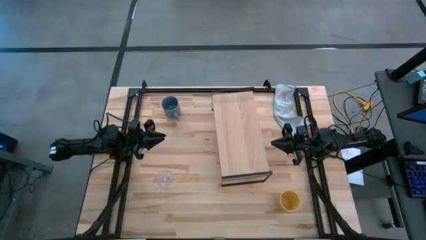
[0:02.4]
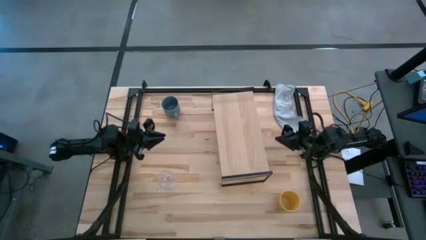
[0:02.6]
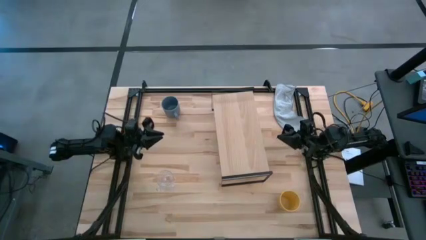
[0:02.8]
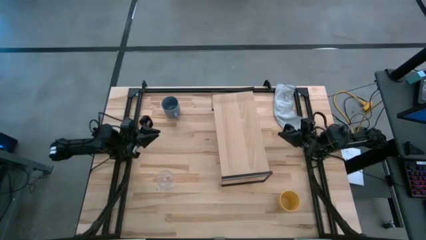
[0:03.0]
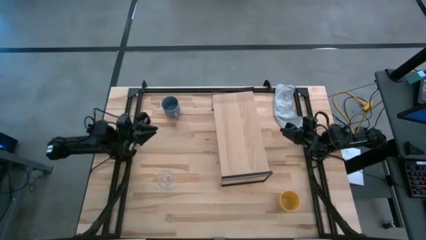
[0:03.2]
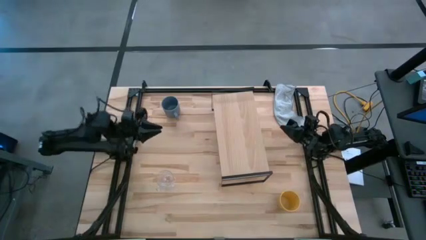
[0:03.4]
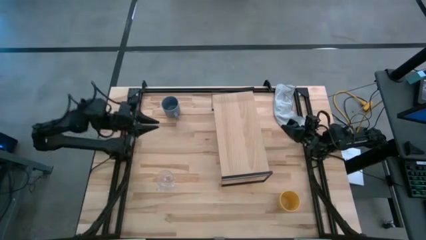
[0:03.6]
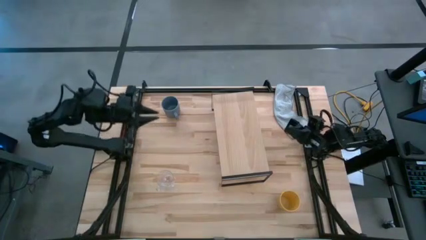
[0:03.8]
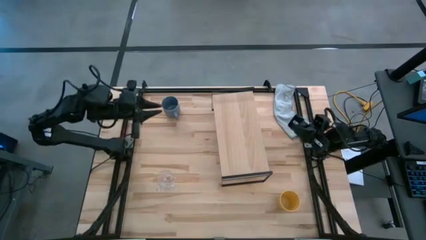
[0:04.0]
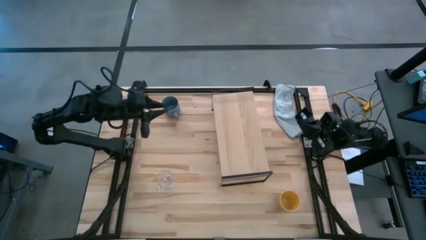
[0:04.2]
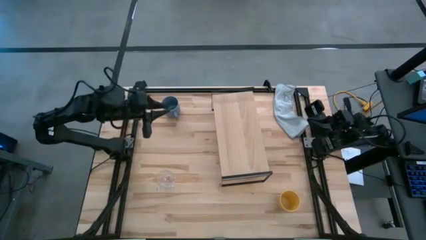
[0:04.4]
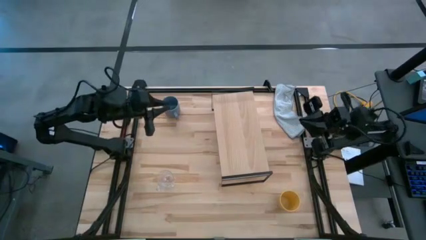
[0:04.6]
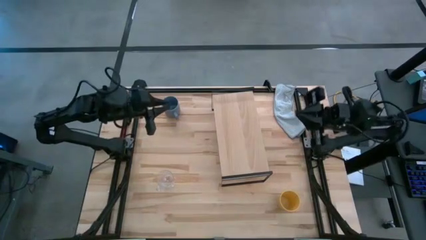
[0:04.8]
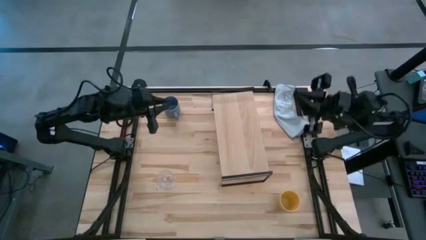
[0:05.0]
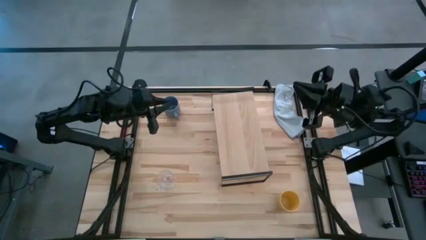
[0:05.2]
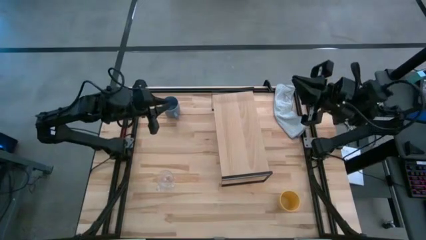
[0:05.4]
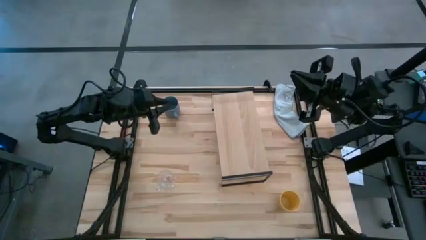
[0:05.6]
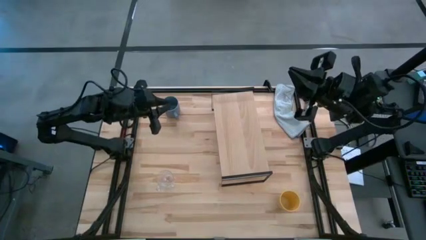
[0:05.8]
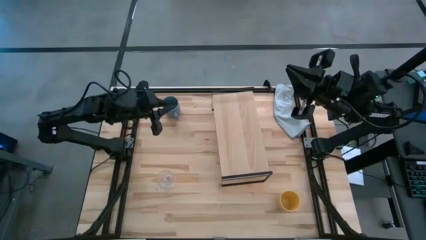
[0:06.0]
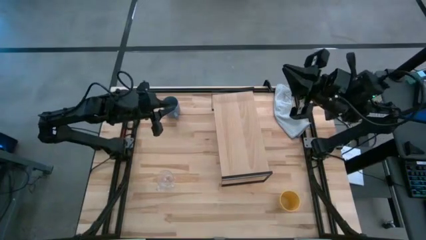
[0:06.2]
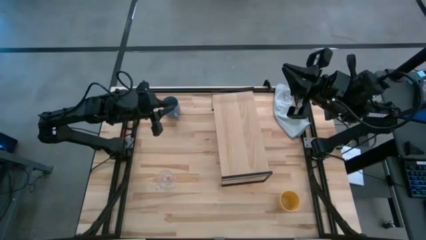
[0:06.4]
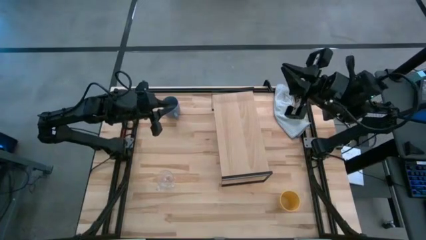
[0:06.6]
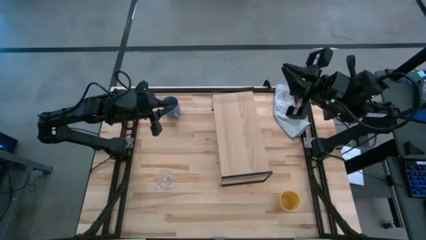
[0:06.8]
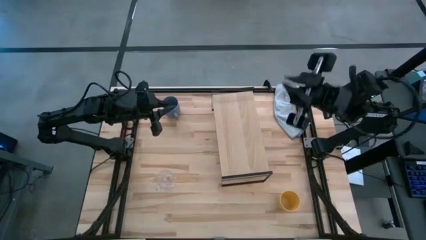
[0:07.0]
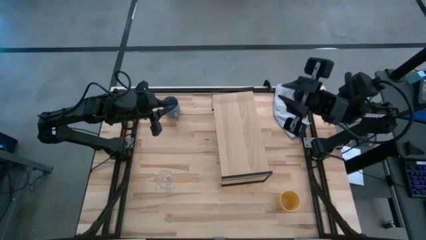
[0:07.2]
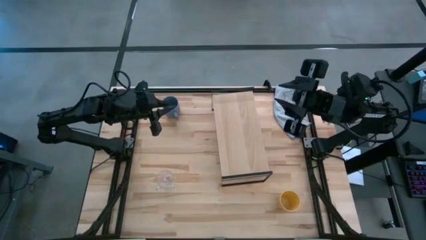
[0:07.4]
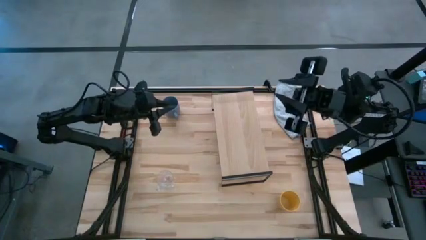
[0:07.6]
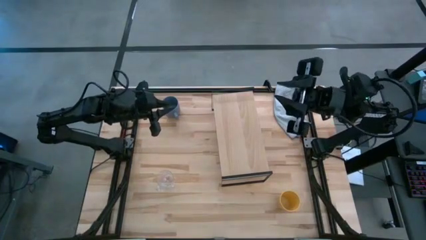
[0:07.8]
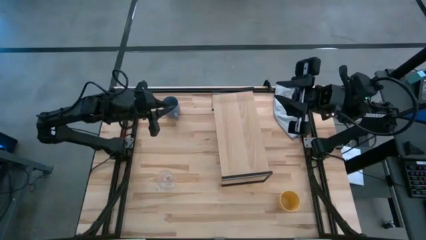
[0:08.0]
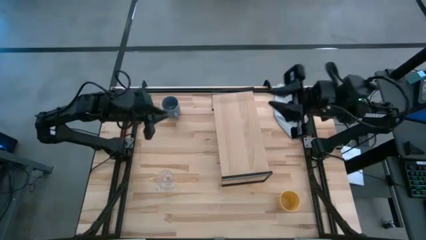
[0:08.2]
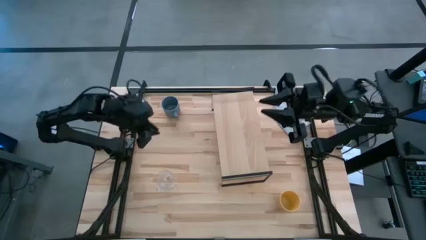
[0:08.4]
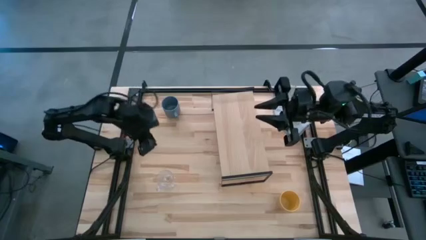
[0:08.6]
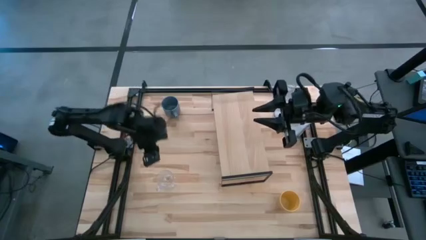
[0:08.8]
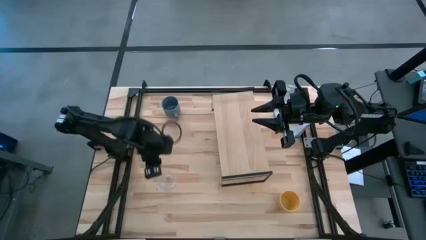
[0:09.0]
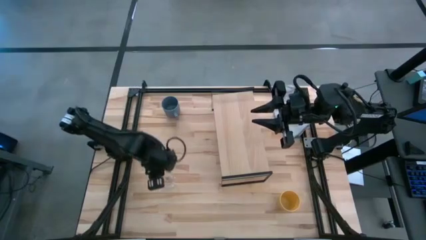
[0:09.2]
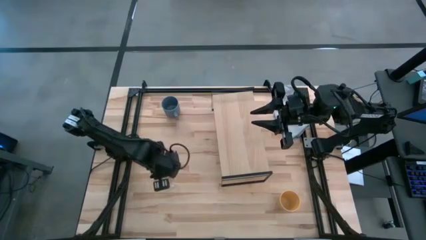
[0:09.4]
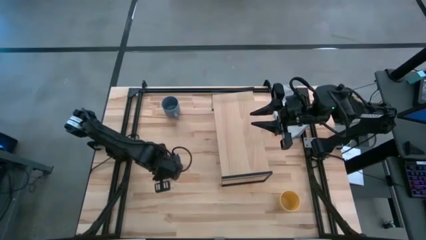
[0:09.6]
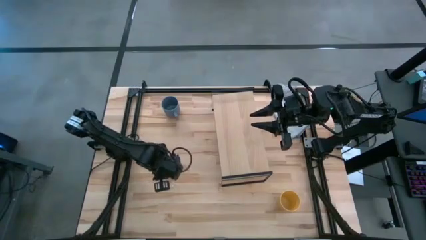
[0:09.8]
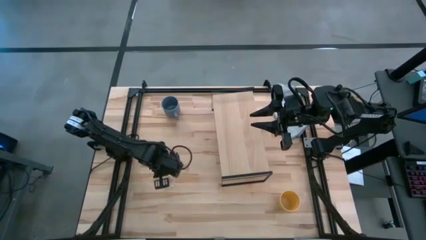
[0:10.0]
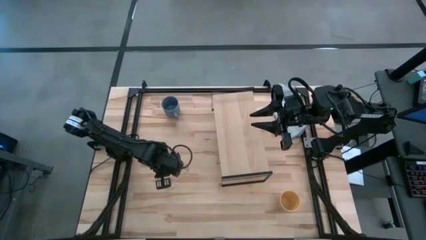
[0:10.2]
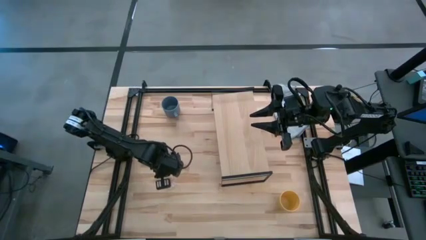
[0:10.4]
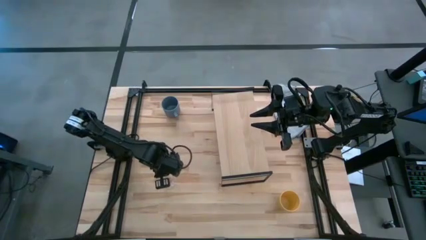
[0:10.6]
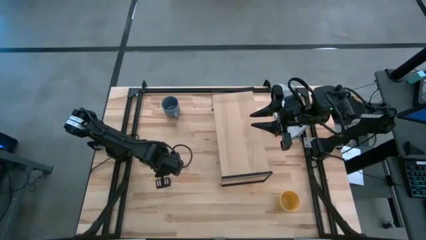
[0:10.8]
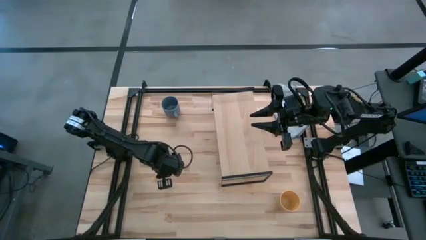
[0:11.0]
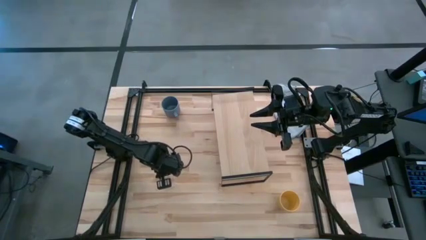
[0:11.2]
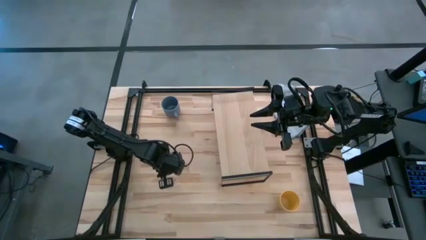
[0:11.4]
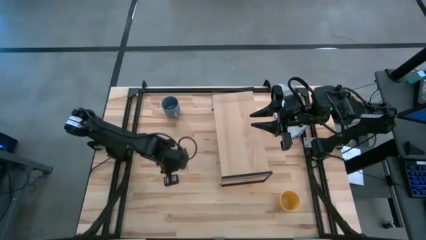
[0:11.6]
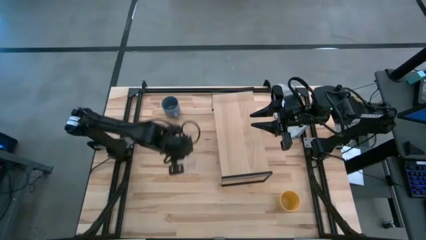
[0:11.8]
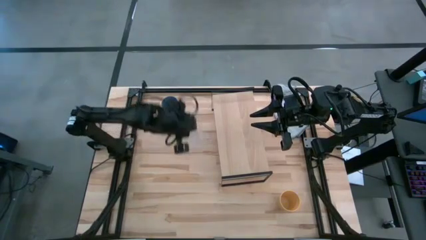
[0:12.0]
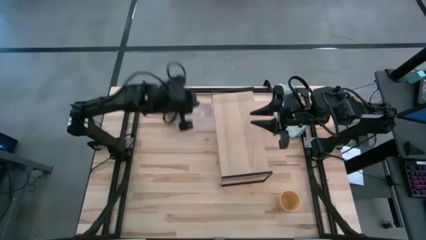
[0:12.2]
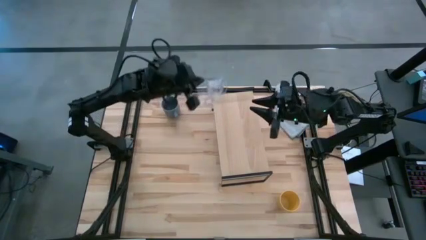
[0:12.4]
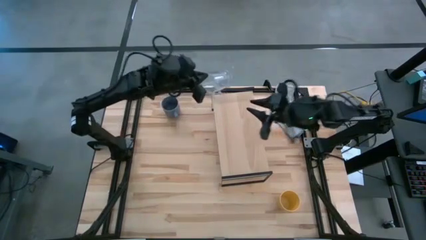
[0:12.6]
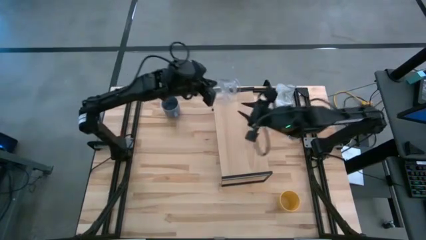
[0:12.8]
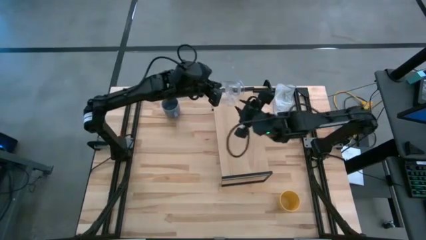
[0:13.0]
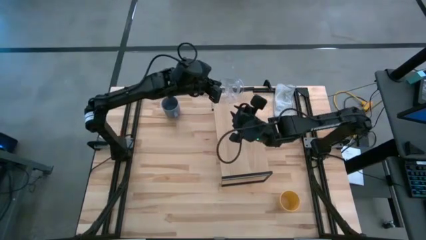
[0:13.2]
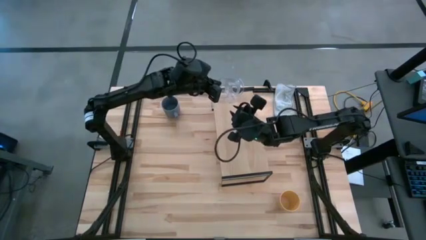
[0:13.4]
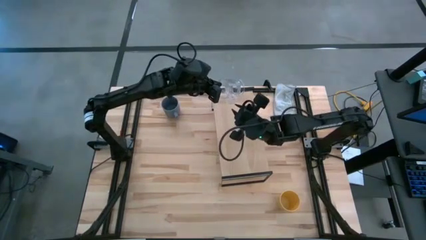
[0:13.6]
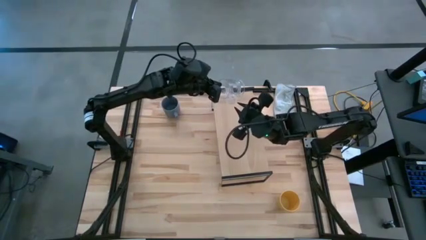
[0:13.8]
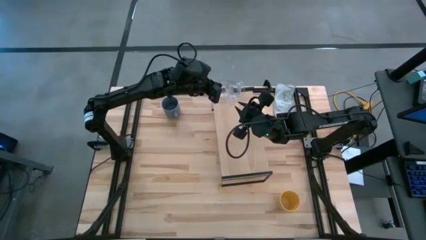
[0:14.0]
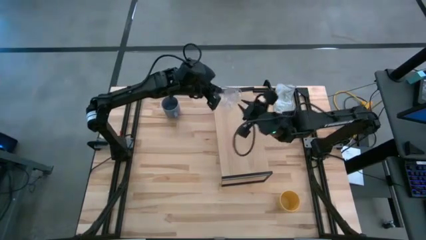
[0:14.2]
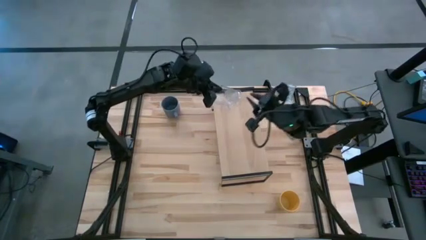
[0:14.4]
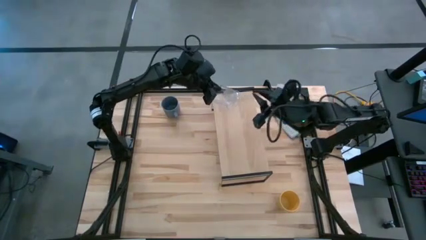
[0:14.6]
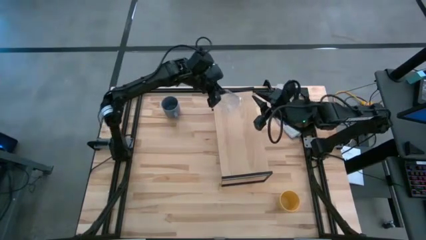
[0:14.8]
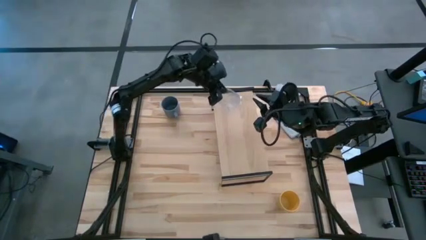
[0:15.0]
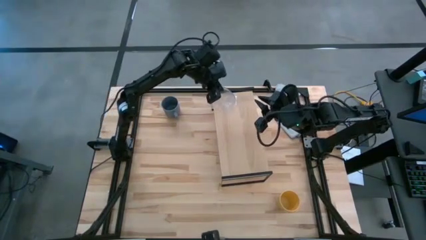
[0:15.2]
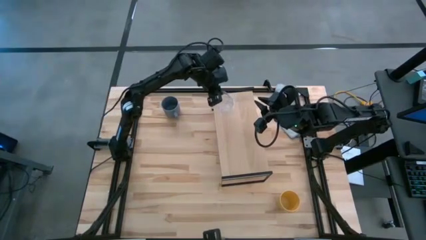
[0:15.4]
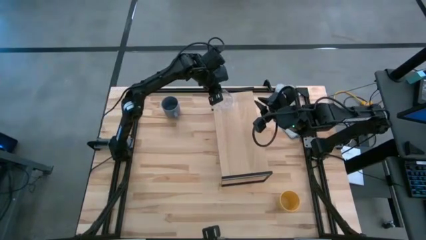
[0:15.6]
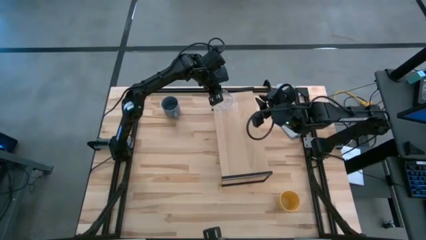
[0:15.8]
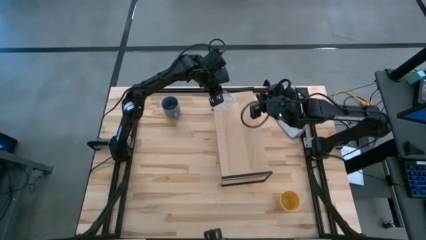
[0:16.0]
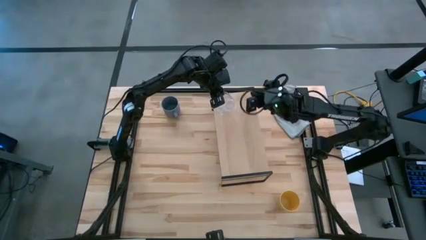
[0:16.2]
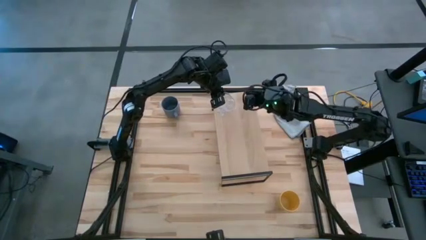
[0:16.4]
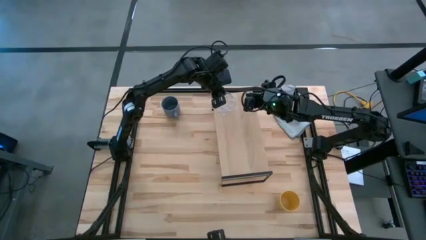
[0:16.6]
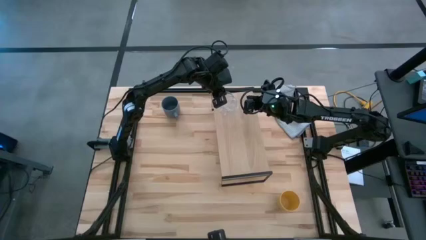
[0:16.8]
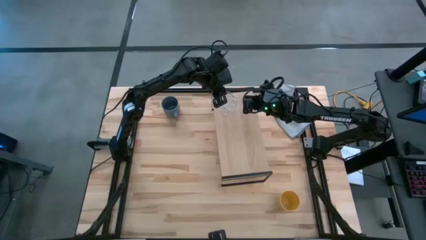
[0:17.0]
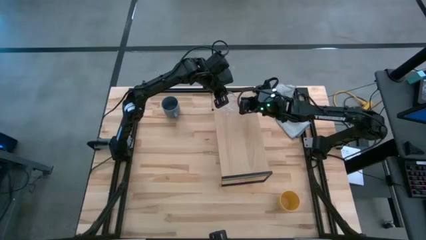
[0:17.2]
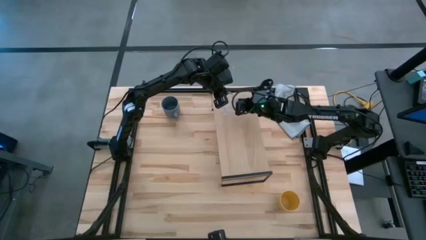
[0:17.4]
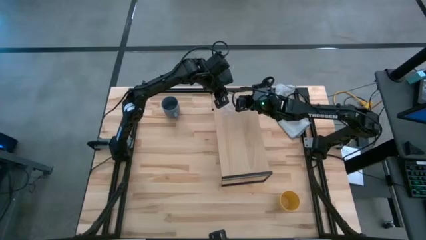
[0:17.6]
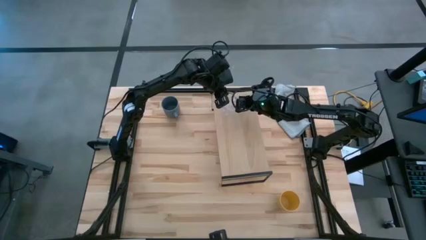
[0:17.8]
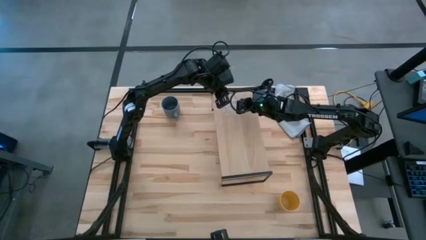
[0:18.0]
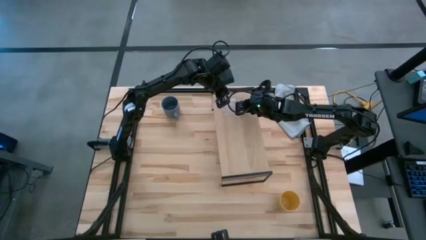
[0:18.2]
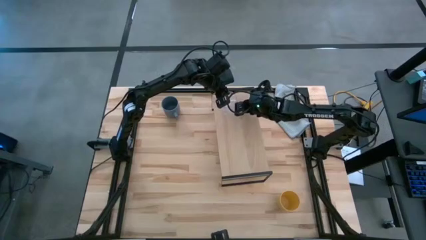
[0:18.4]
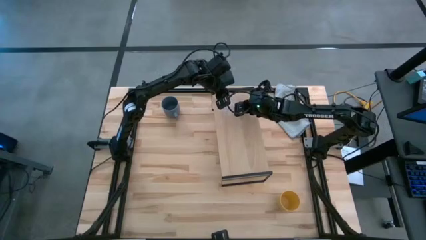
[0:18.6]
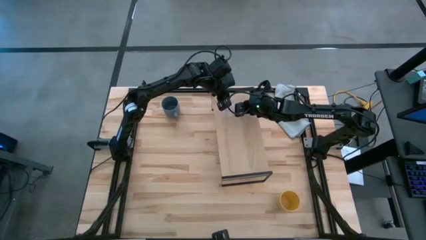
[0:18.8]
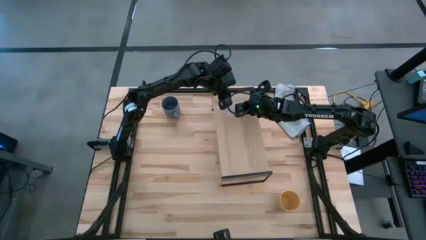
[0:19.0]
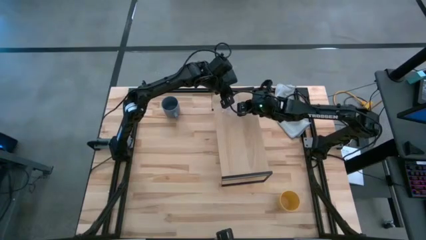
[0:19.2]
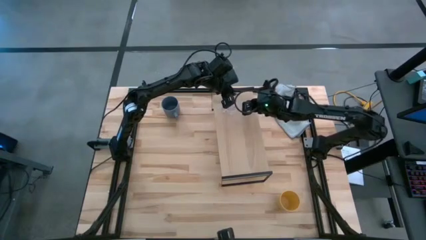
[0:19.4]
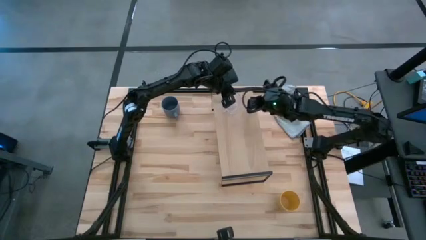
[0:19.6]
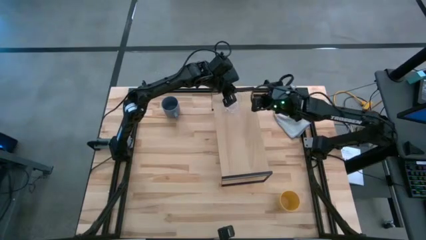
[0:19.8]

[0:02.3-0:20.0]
Task: Stack small to large cups/mugs on shelf
Put the transparent mug on the shelf
